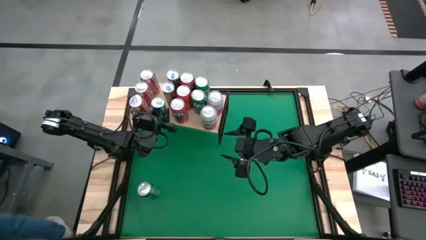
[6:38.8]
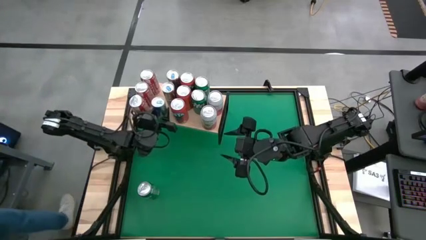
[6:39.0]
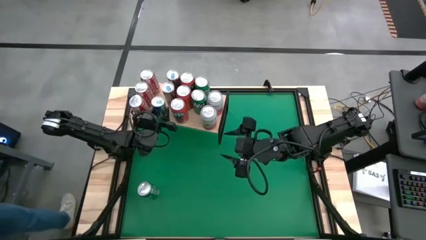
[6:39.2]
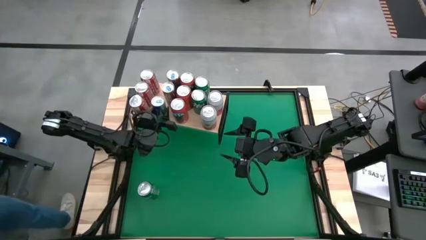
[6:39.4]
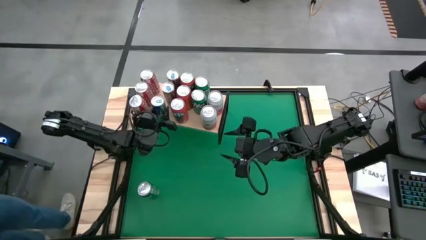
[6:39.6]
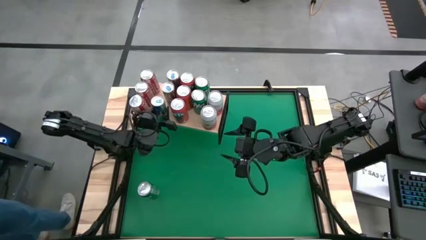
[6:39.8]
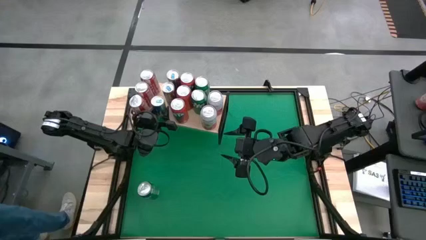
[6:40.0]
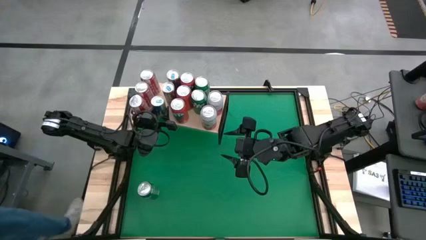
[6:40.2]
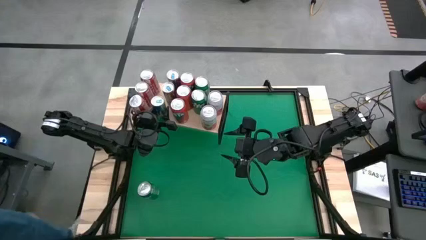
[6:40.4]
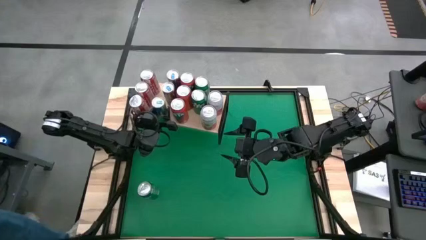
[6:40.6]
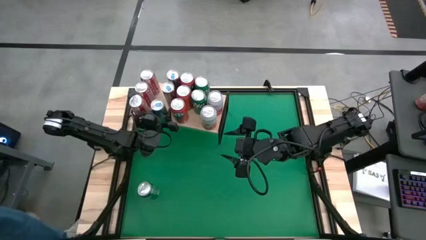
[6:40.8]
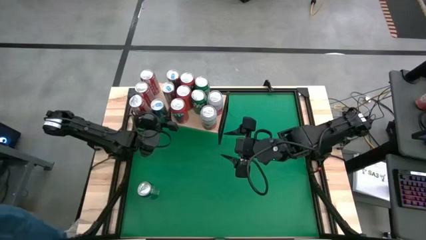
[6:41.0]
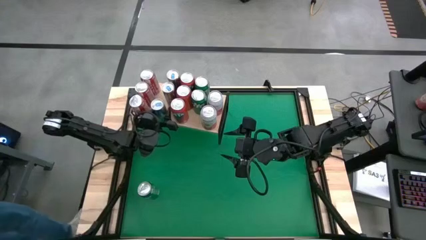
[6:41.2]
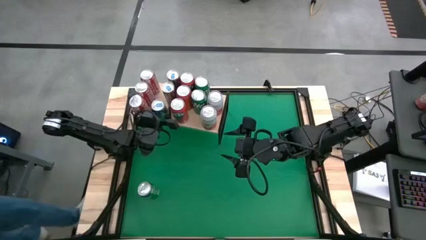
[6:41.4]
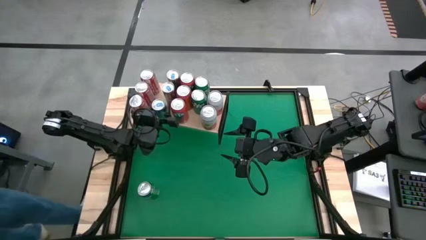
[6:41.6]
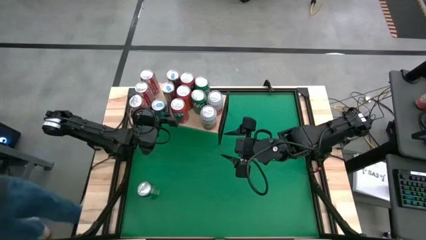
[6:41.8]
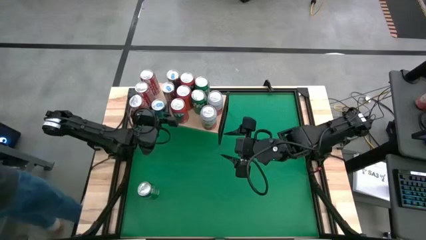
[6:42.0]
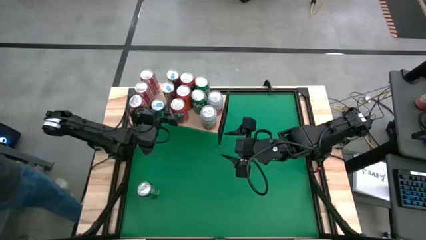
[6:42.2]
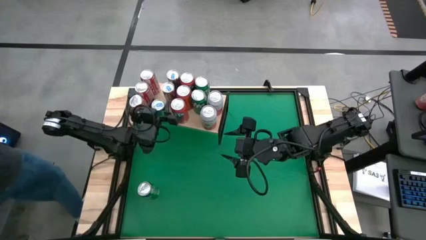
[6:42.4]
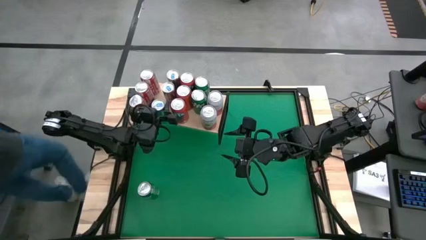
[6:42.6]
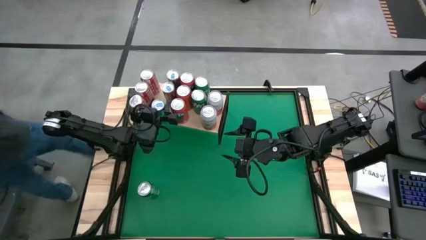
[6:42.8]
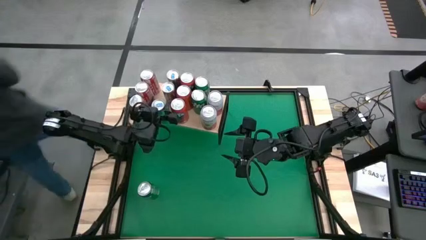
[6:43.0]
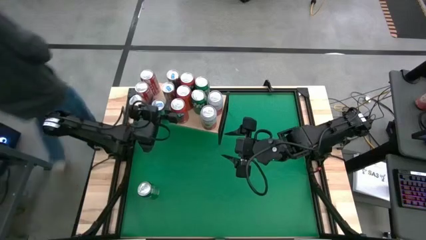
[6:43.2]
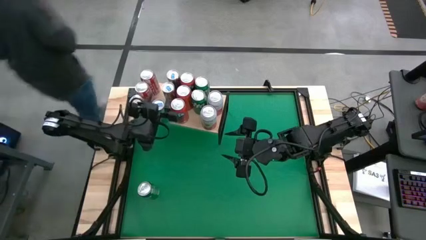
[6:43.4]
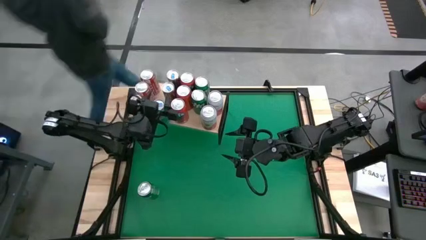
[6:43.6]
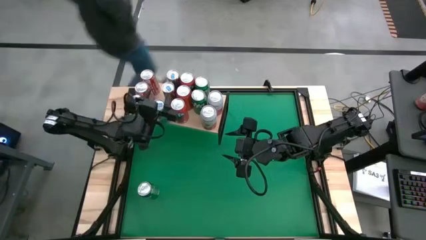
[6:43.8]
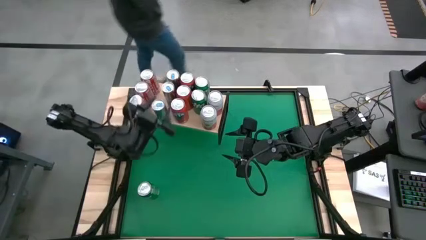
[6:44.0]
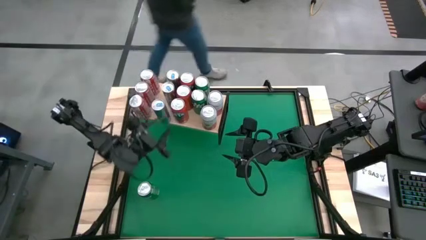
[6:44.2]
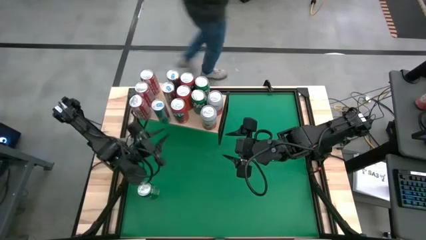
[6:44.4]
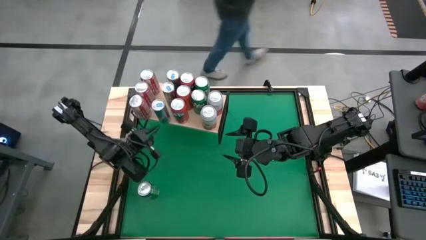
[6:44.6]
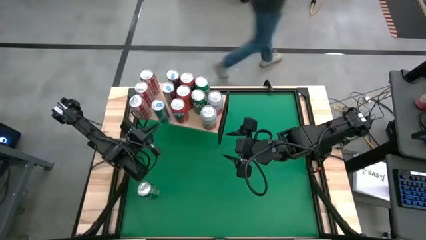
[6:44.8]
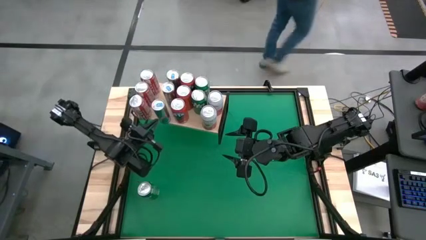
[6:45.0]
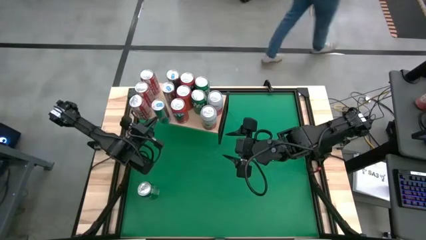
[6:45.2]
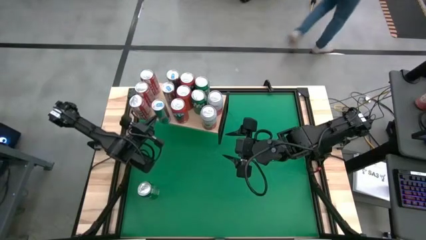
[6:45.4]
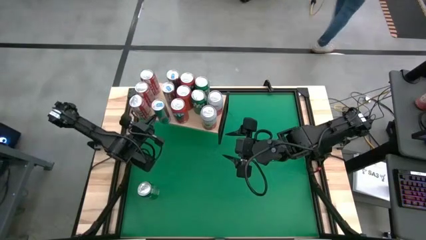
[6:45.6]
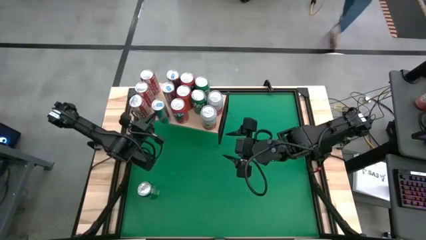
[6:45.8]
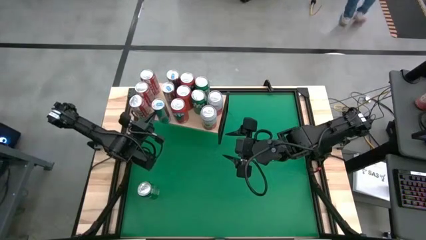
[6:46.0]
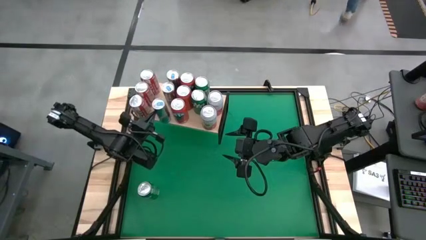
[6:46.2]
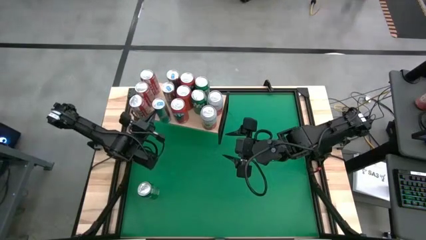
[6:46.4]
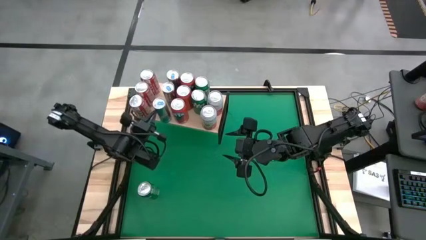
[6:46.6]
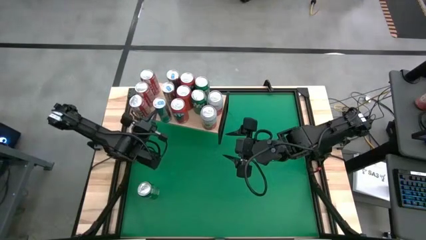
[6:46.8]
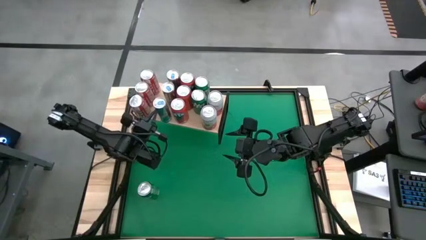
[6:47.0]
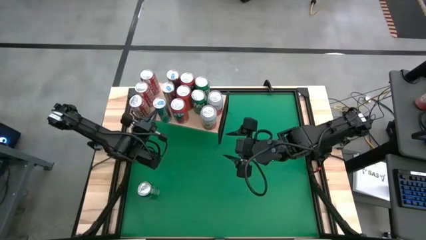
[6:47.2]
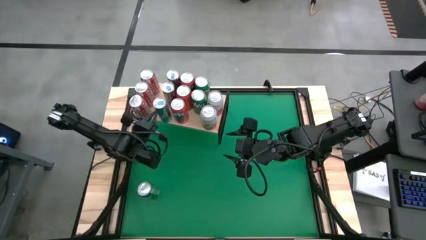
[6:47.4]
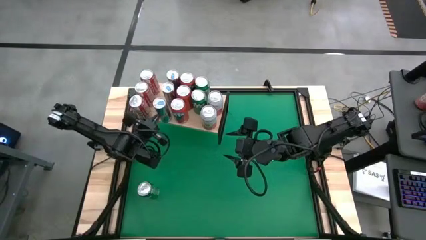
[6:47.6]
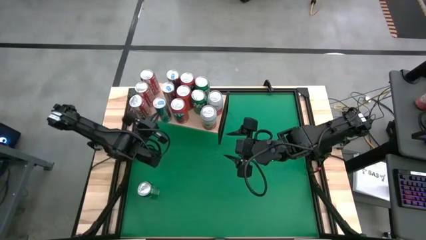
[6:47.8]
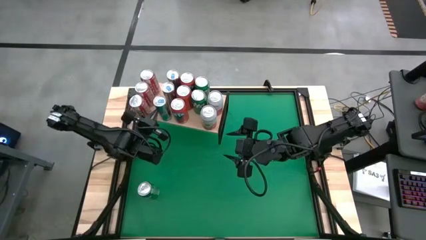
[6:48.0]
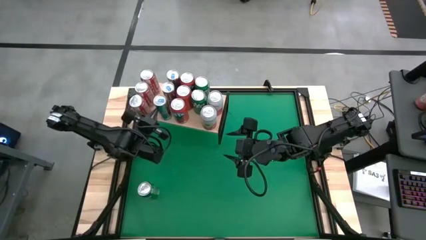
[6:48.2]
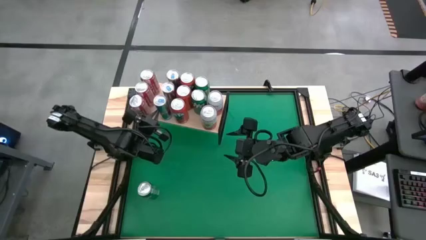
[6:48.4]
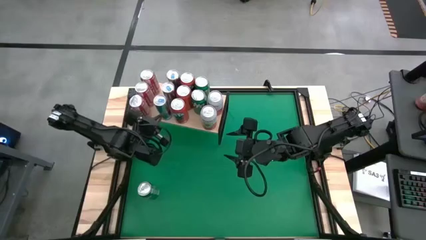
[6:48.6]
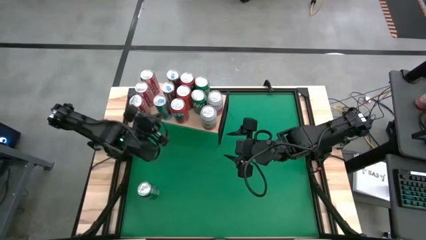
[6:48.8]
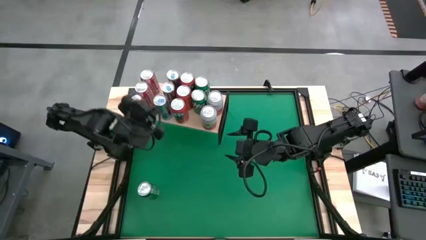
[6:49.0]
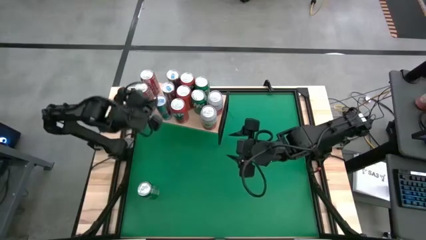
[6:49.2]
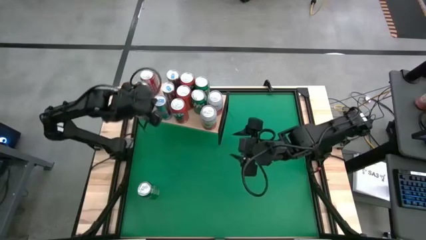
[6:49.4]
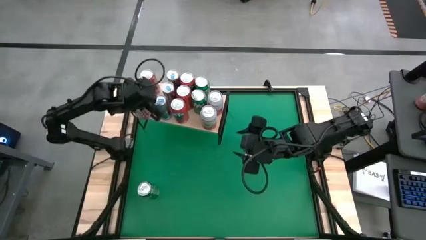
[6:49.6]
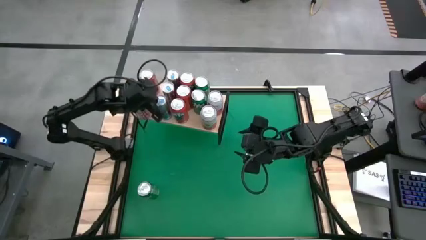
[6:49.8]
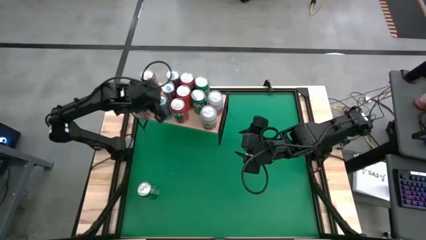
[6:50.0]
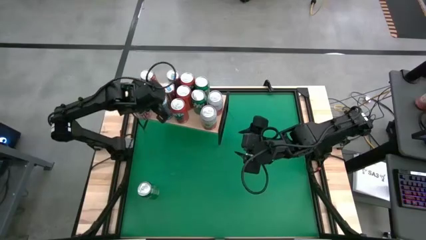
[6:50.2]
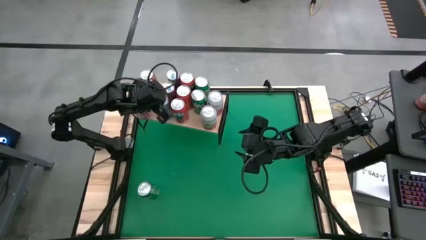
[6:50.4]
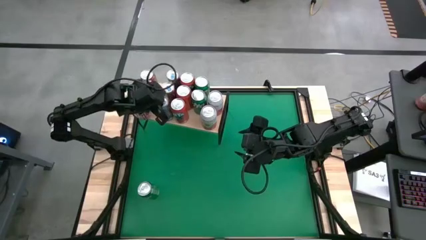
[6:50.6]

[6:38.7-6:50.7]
Task: Place canned beverage on shelf
Put the blue/white soda can on the shelf aligned with the other blue/white soda can

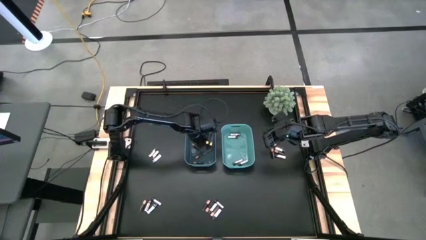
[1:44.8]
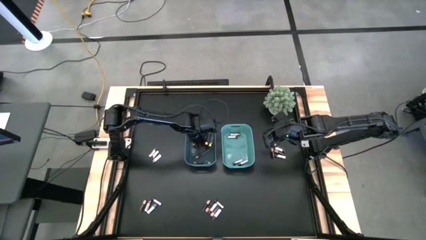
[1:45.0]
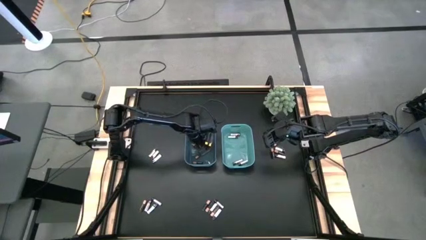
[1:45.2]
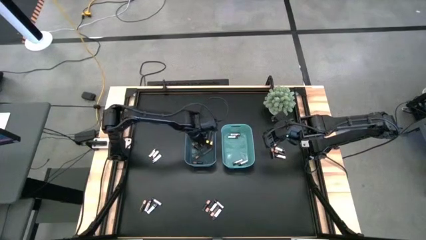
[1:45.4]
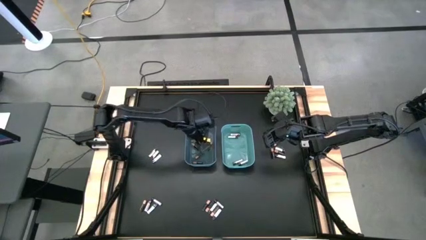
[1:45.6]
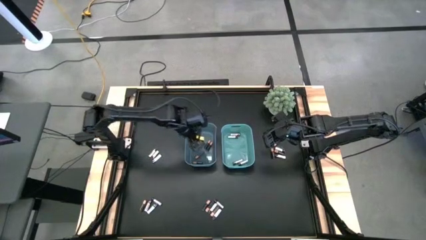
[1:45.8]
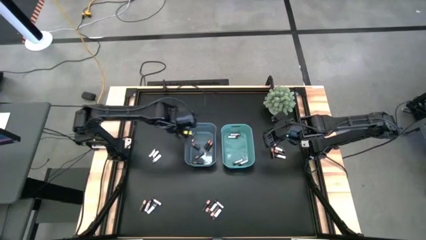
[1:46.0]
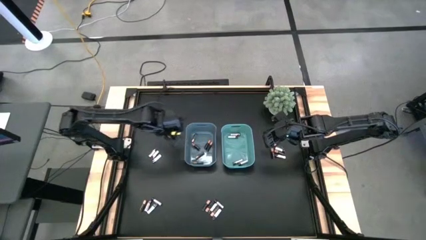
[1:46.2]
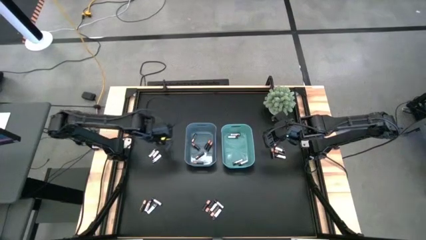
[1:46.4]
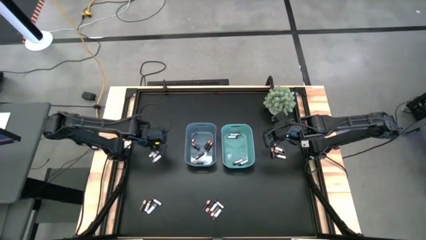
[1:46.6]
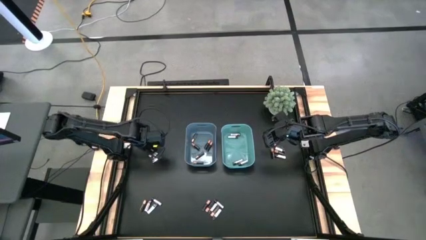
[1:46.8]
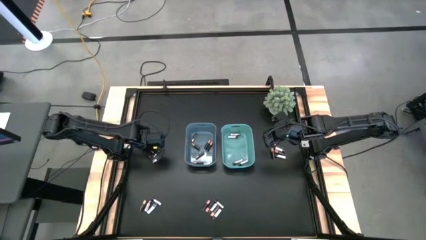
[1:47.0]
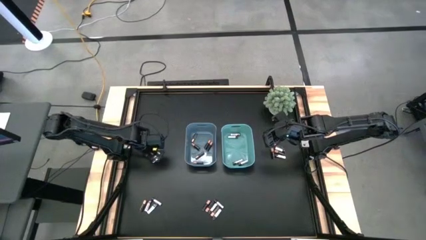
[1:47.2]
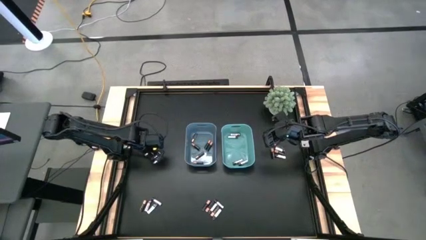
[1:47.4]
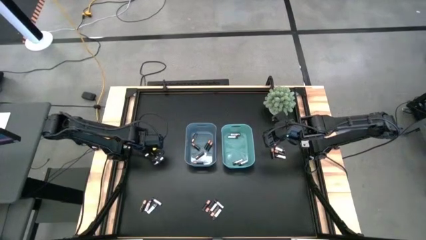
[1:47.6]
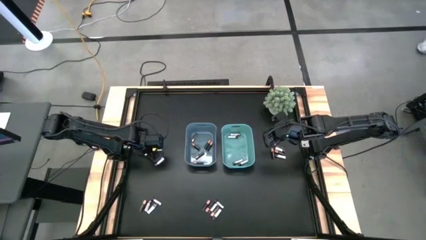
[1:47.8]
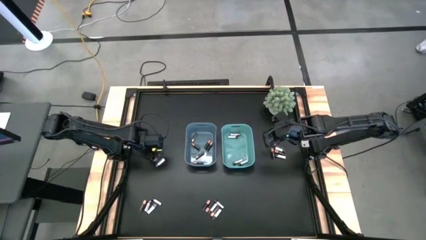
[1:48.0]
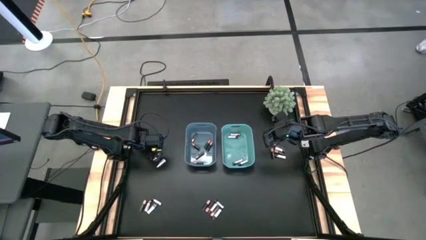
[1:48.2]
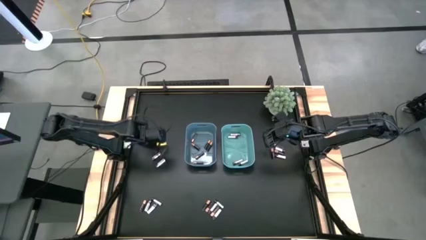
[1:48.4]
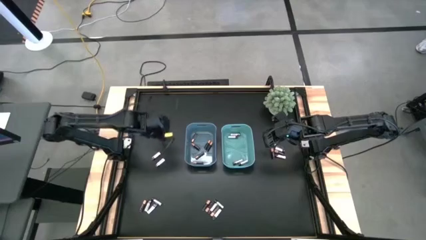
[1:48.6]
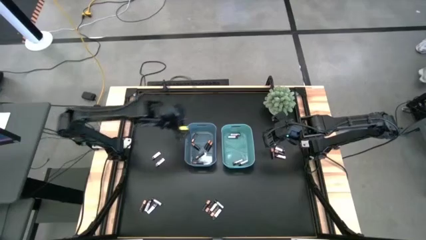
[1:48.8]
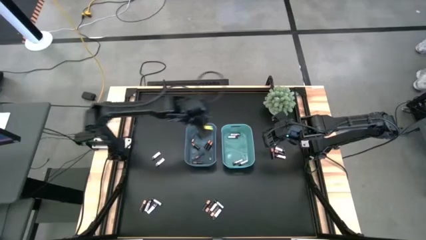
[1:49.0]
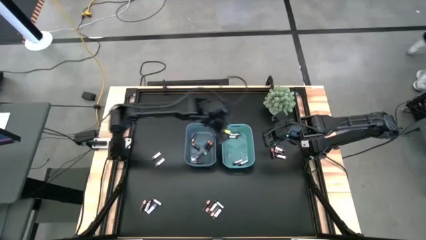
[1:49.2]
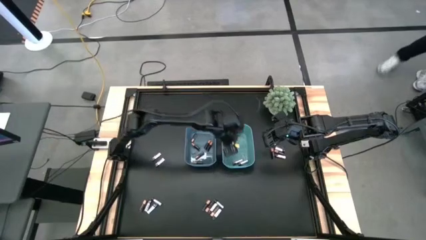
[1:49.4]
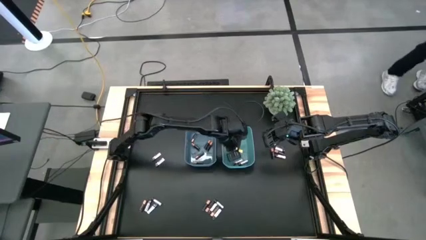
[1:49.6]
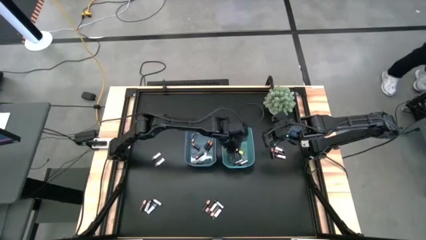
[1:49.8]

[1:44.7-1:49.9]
Task: Sort batteries
Put the white battery into the green bin
